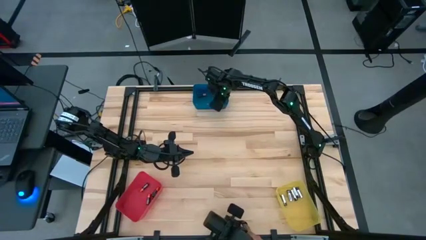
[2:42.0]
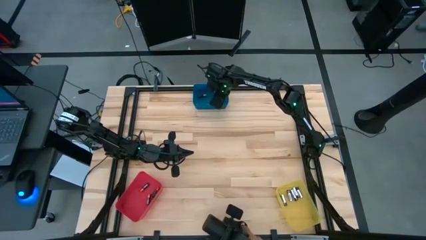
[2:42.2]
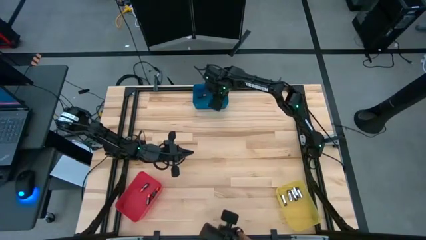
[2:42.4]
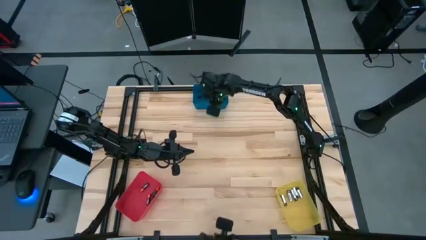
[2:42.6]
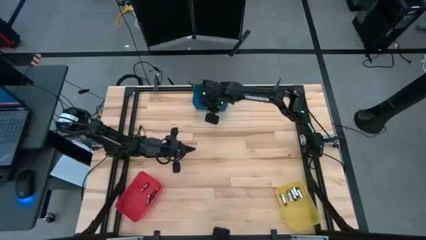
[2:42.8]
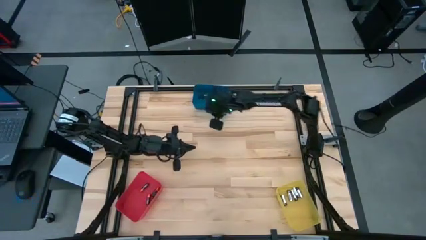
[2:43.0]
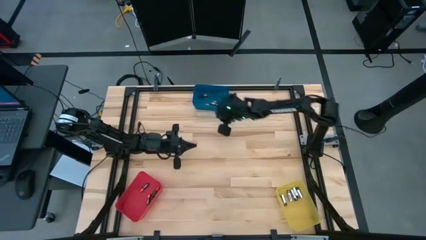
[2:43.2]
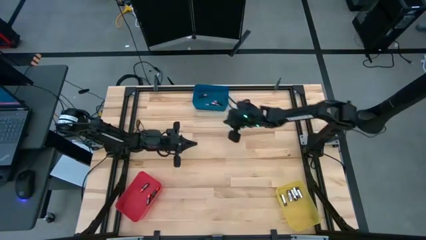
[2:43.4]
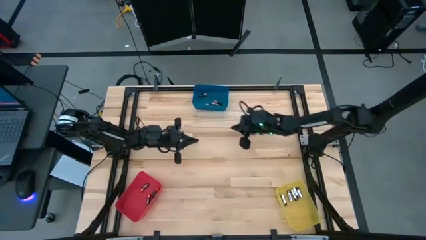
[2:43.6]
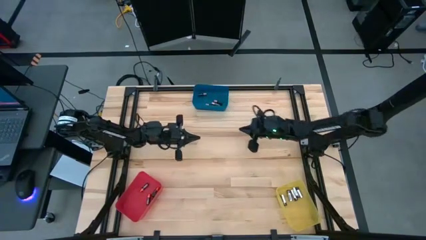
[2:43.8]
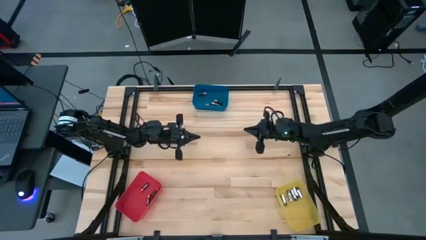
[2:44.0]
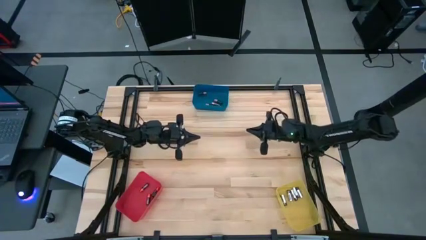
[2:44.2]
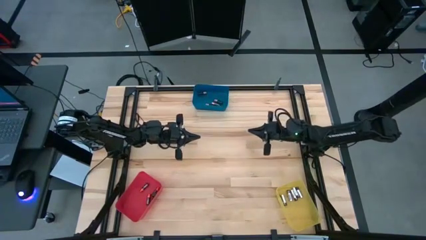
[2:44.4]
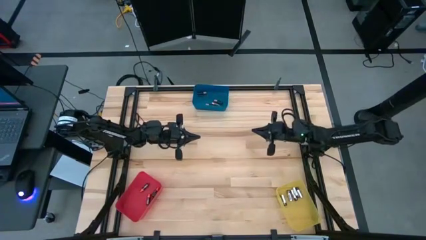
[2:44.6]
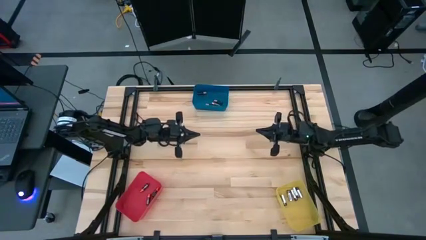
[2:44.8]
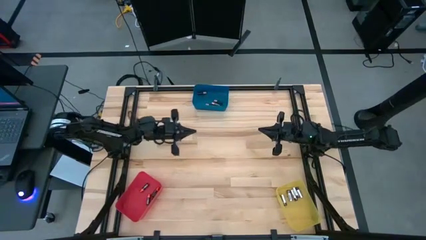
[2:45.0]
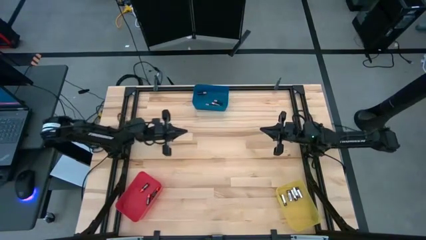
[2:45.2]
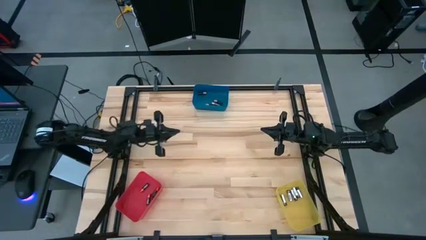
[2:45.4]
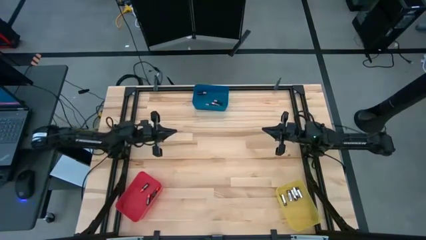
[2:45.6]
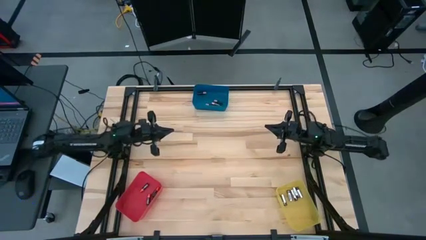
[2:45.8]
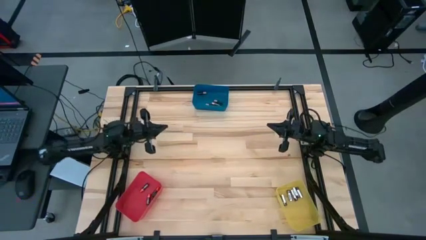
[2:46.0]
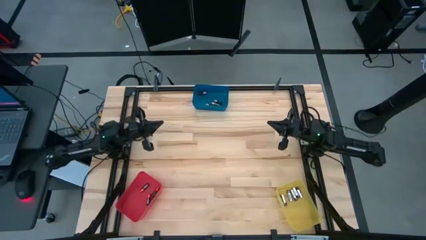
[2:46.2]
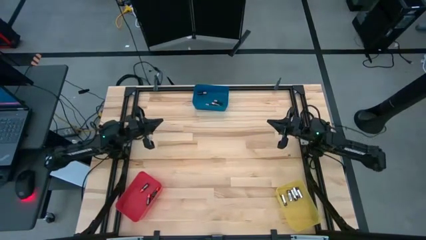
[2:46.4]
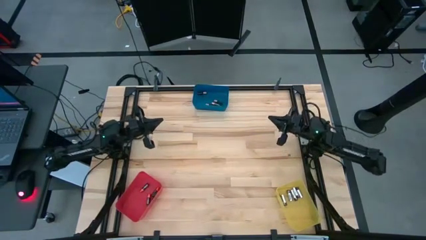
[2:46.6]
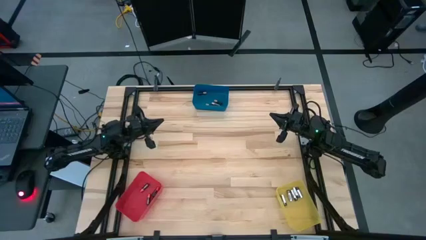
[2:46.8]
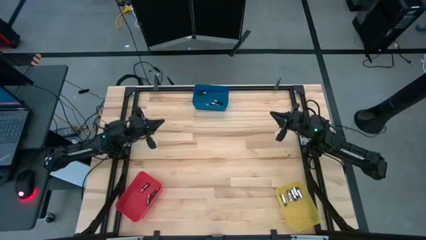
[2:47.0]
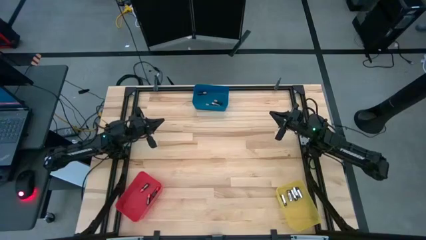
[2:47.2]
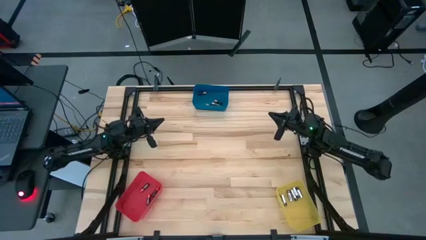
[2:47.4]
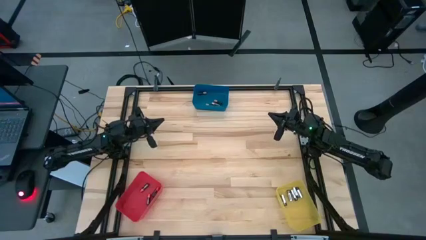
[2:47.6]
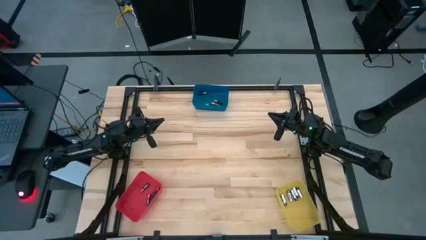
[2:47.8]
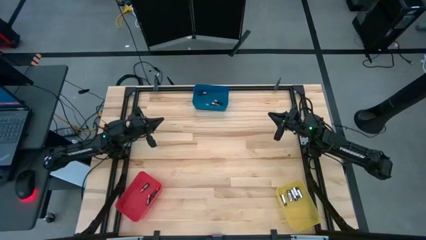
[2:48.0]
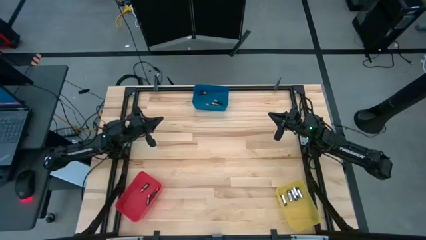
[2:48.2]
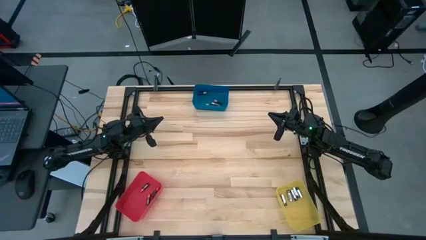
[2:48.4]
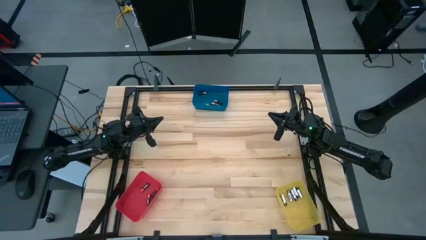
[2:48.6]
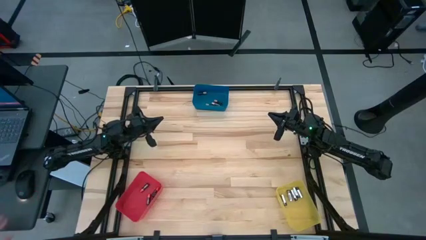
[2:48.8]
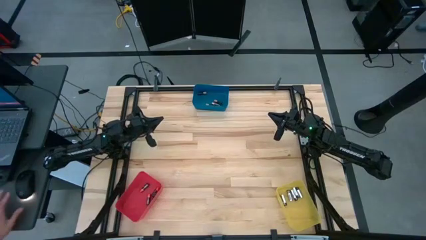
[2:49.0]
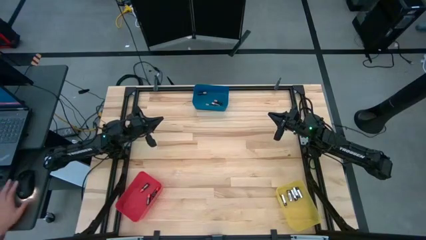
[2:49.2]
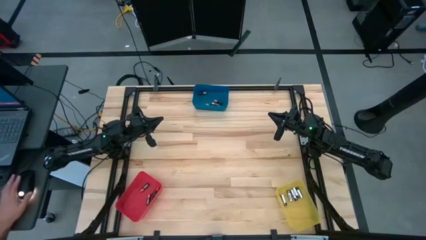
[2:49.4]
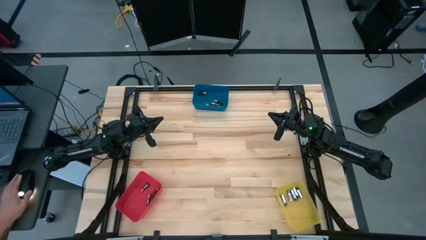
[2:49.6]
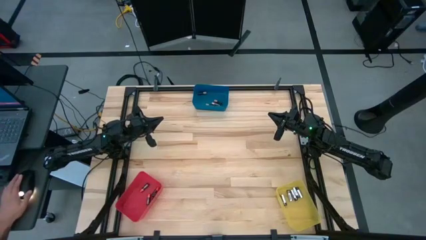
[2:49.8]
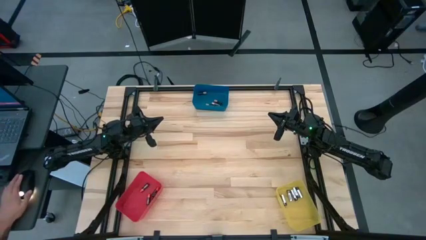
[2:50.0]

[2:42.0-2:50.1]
Task: Sort batteries
Return to Home Position

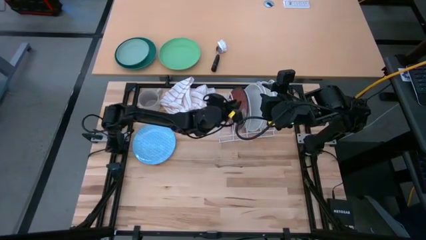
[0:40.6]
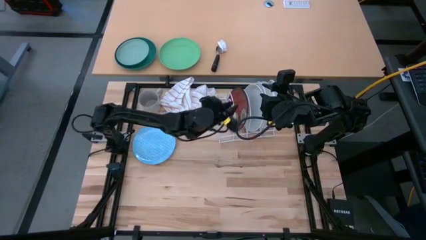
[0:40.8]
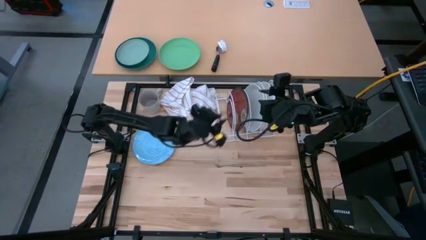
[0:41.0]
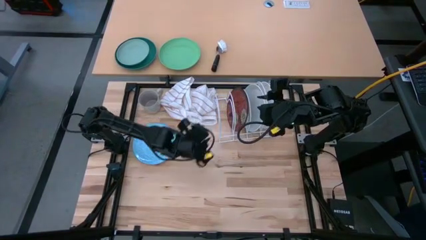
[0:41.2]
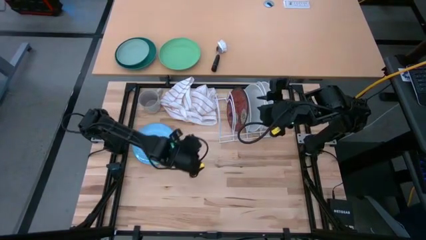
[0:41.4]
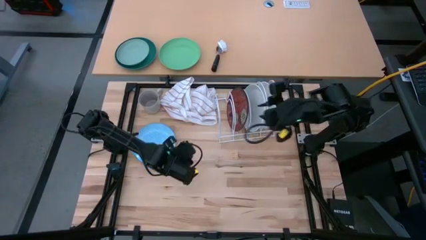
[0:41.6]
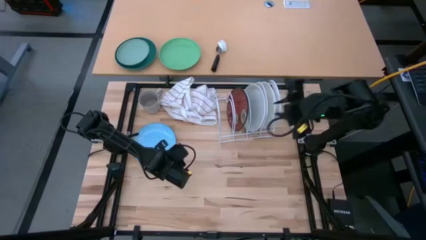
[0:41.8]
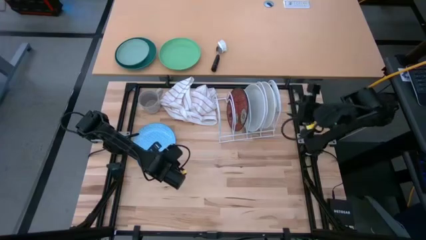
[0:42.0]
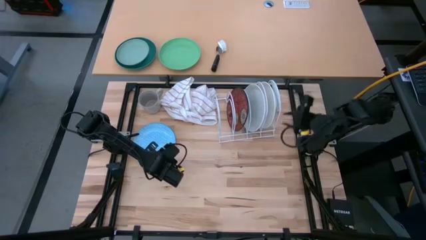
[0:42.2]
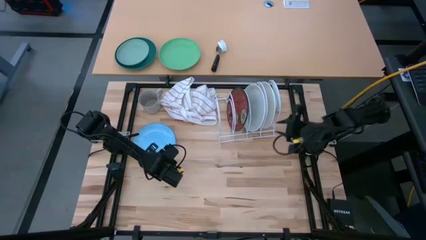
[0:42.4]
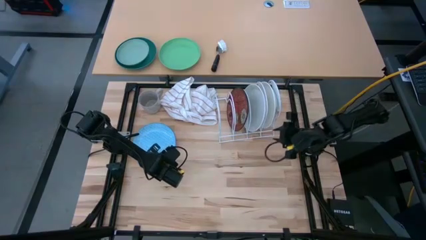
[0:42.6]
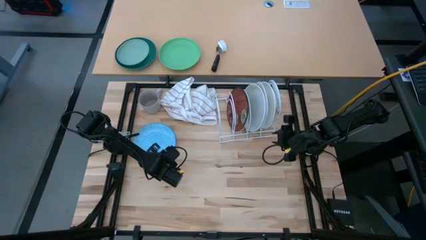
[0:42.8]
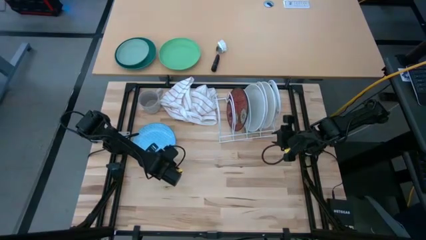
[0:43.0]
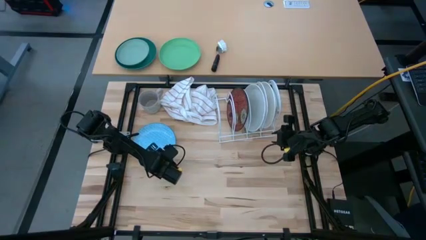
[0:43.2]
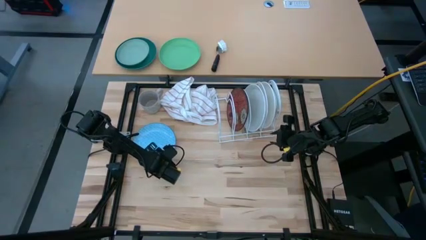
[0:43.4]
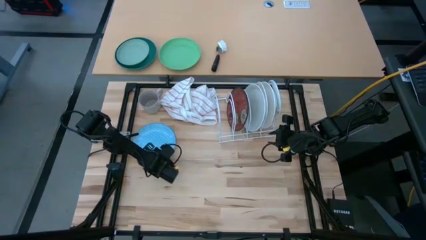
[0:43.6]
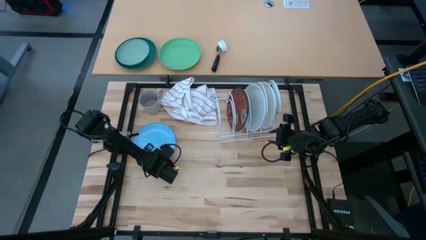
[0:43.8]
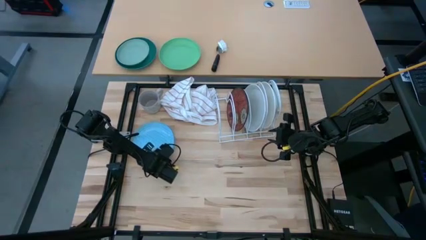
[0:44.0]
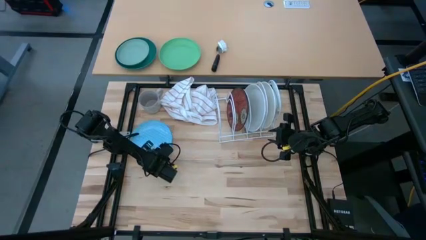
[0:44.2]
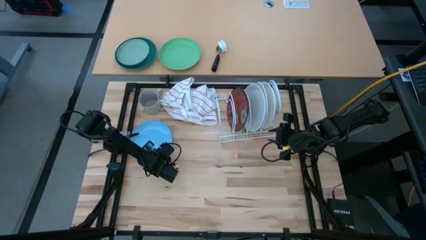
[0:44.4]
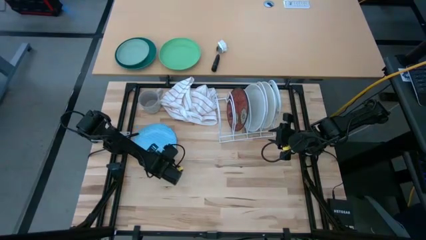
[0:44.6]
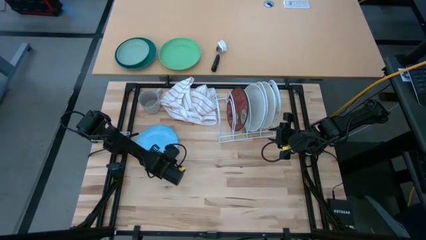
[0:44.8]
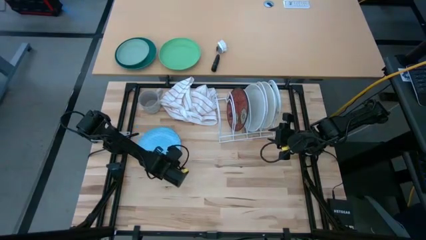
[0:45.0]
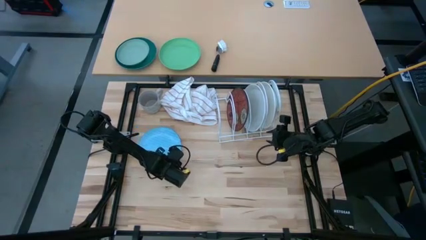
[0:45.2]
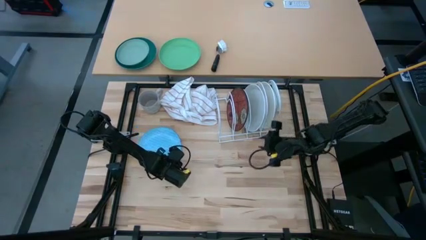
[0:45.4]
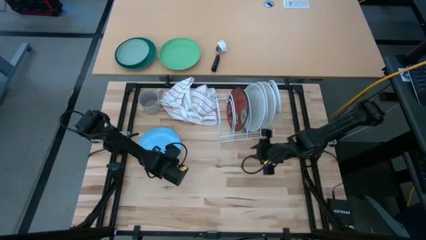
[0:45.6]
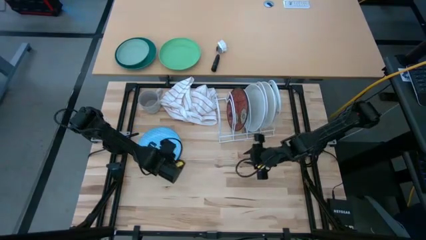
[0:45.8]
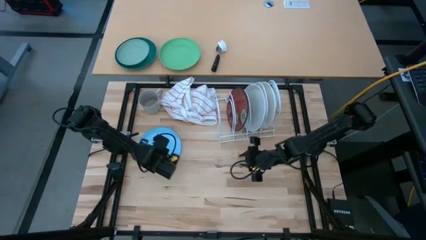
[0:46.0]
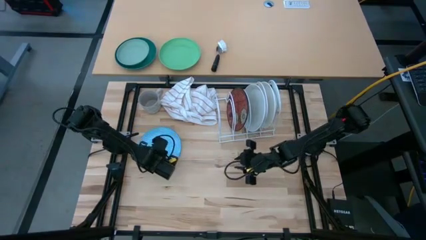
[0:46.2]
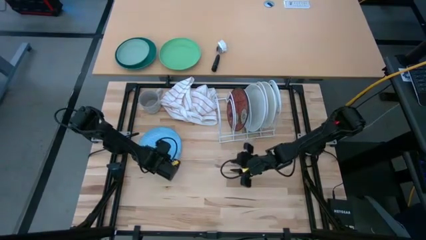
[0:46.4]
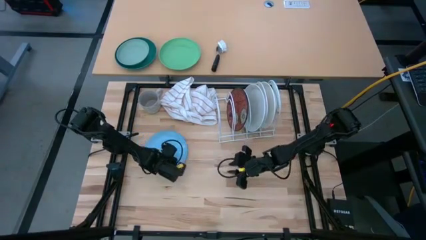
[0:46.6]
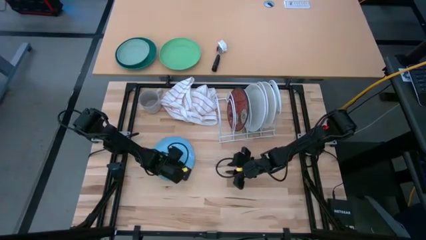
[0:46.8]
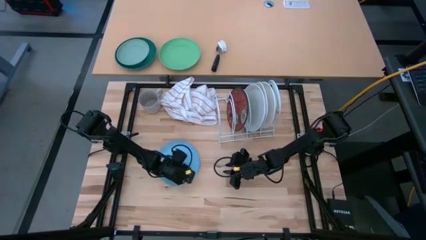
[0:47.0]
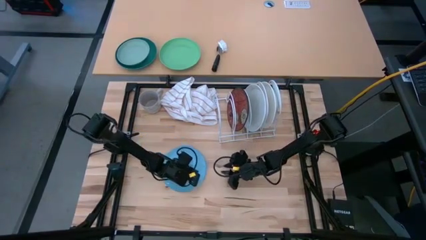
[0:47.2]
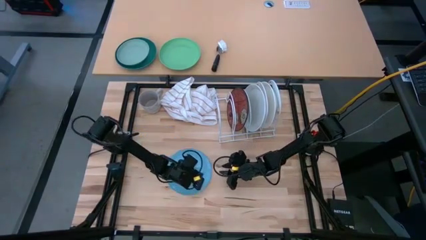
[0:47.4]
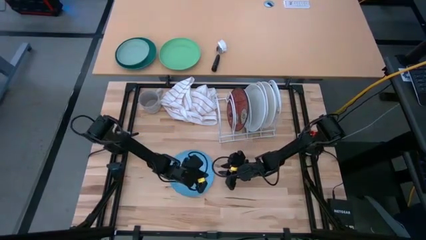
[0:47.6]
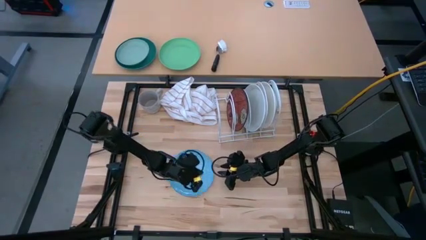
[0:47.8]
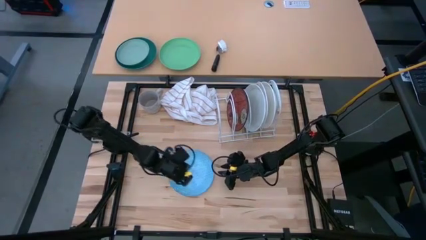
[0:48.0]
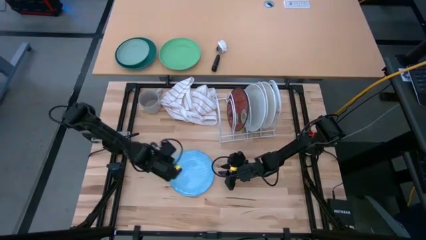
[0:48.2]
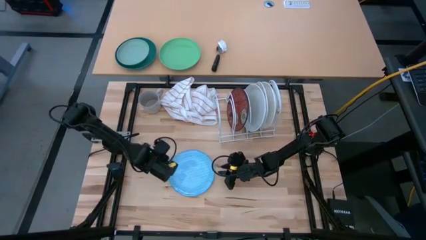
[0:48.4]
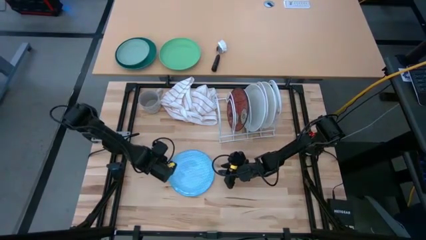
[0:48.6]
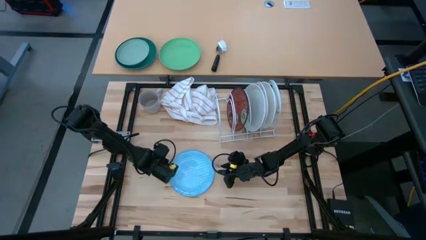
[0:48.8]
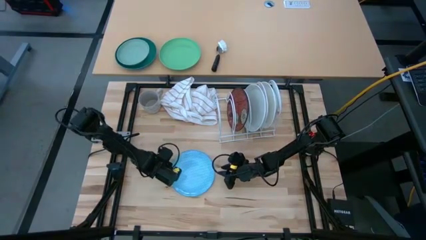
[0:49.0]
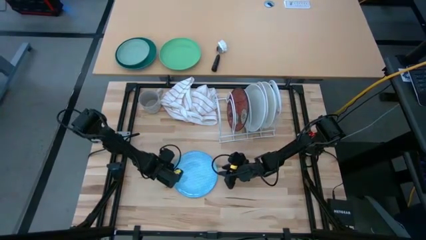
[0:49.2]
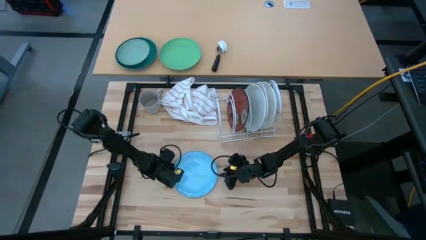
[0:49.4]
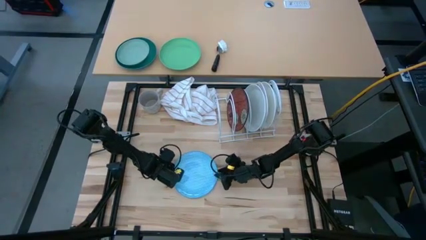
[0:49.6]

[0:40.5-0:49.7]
Task: Sort dishes
Put the blue plate into the white dish rack
